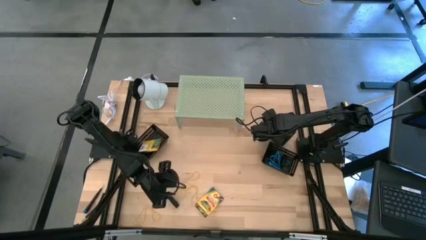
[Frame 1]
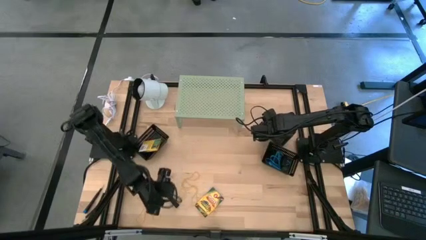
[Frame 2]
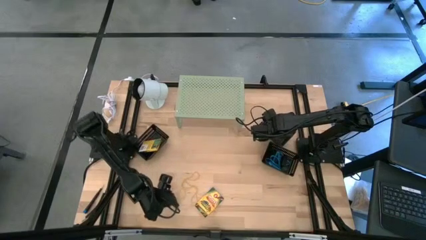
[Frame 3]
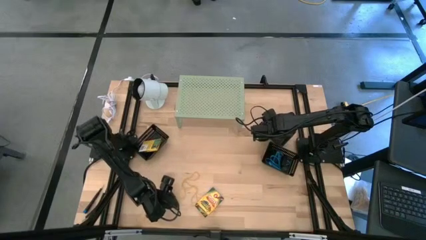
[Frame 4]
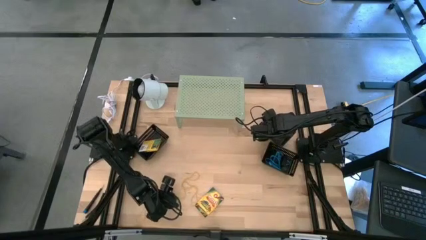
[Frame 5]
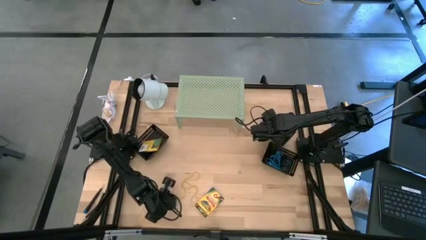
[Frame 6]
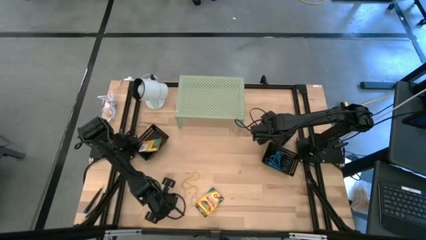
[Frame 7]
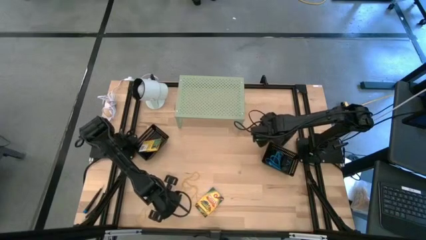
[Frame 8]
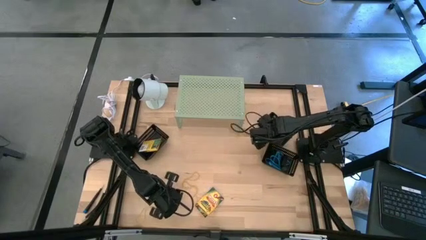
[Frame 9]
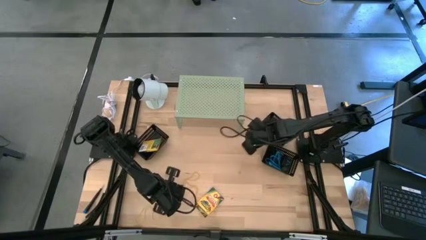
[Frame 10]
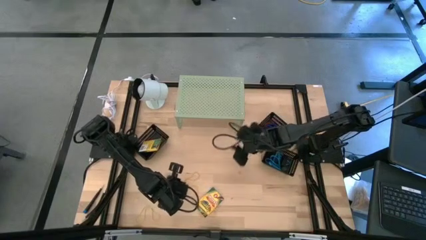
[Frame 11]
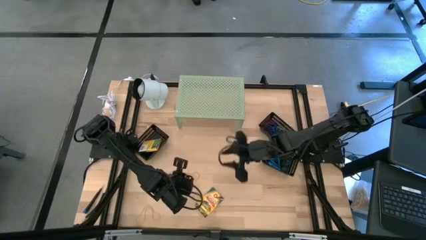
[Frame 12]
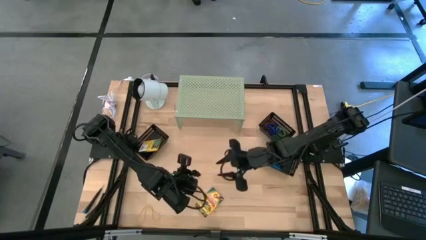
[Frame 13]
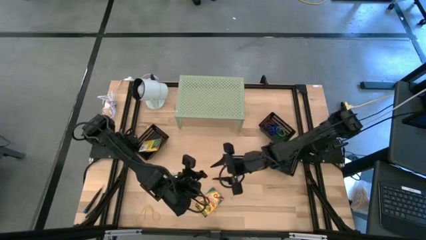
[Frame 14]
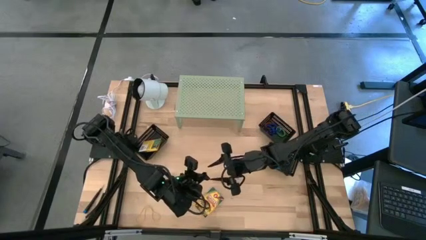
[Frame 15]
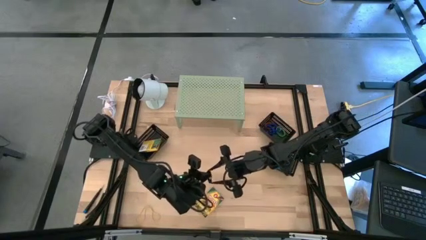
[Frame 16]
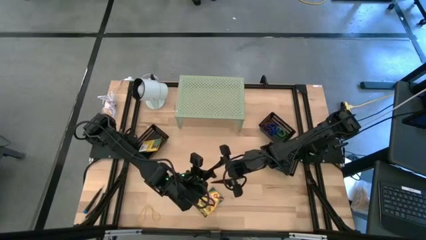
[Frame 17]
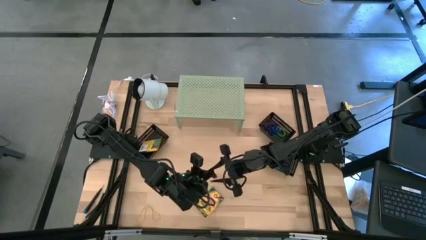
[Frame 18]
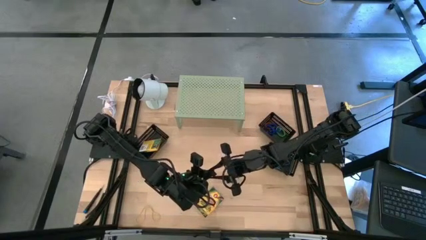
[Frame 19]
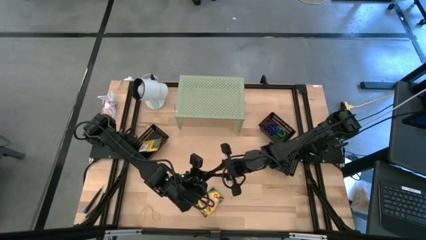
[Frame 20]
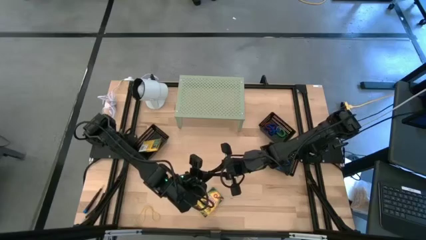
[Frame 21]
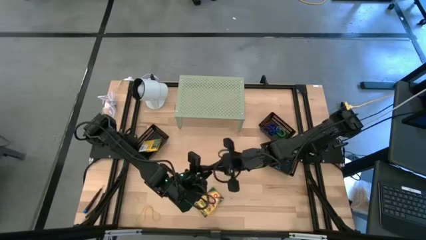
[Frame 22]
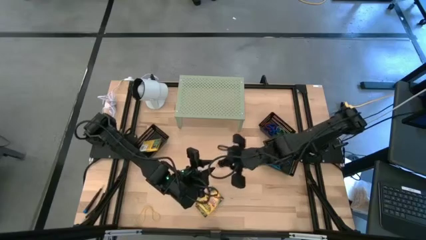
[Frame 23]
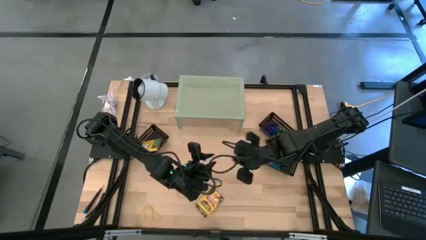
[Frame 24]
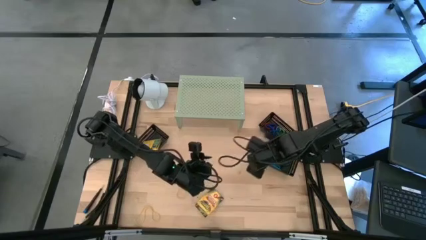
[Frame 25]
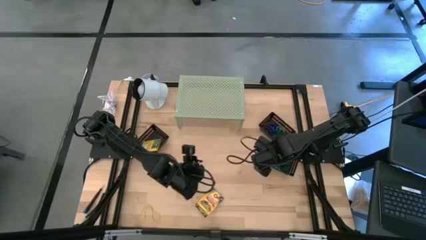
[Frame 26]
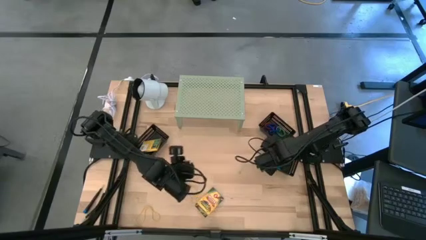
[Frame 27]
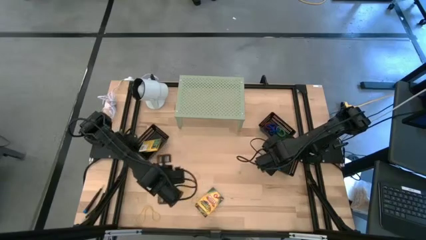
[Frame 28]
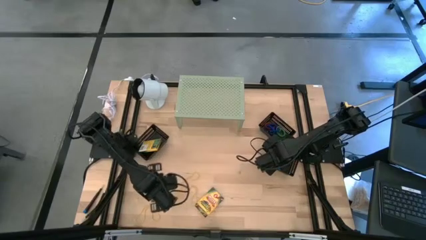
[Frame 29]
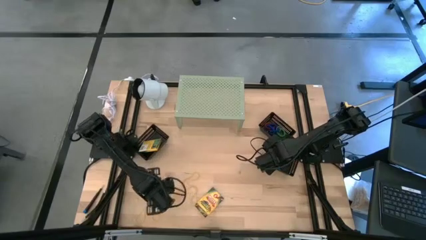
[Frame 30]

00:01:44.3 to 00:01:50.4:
Task: Pick & Place Office Desk Supplies
Put the black rubber band into the bottom right black bin

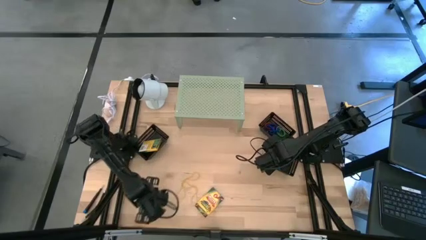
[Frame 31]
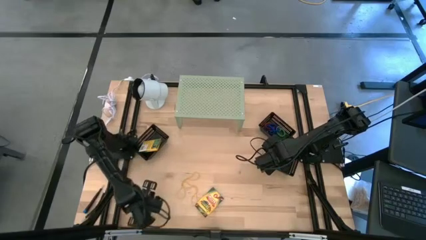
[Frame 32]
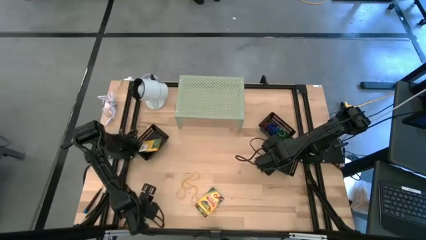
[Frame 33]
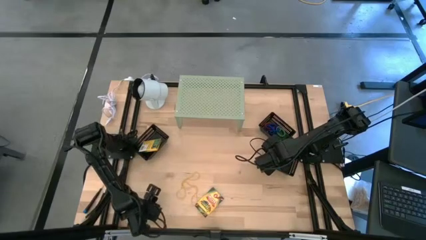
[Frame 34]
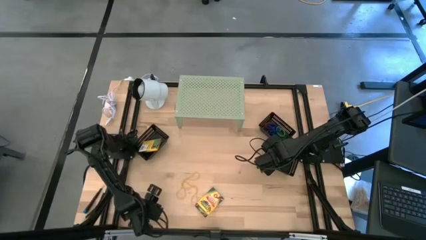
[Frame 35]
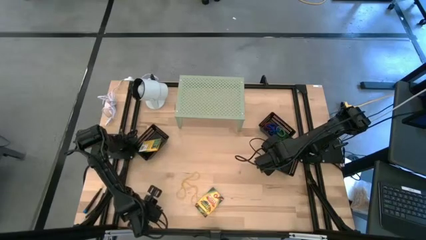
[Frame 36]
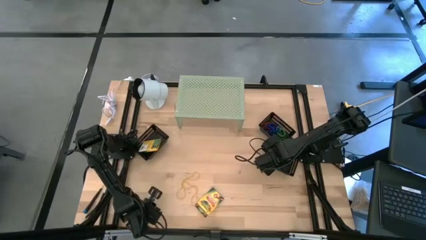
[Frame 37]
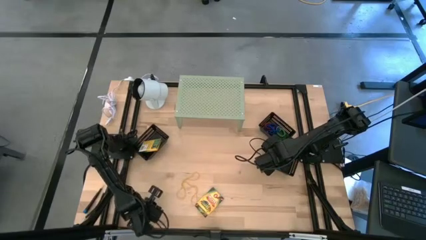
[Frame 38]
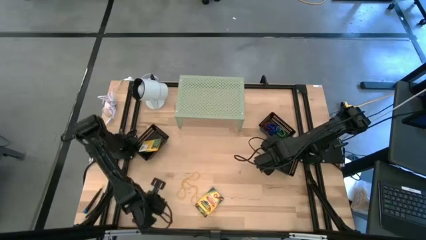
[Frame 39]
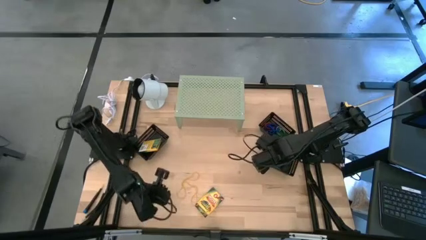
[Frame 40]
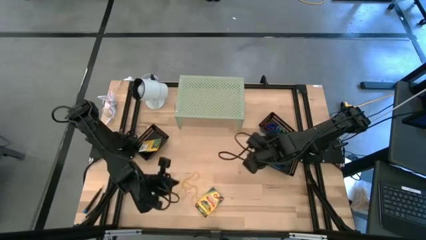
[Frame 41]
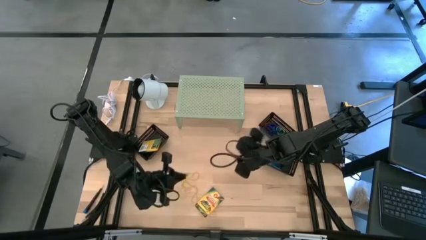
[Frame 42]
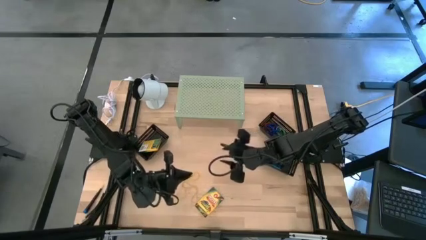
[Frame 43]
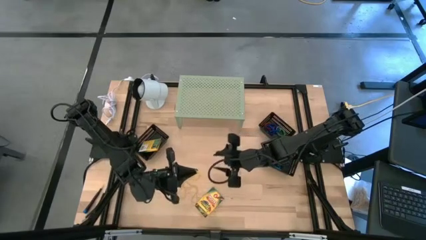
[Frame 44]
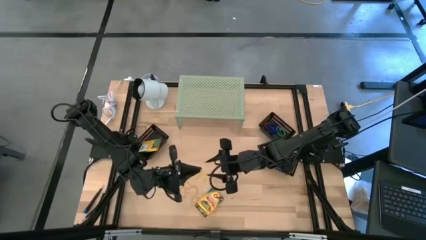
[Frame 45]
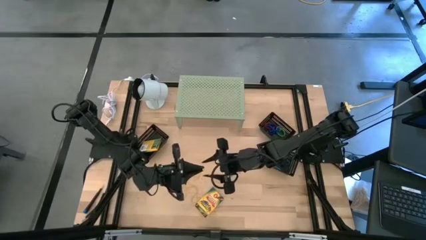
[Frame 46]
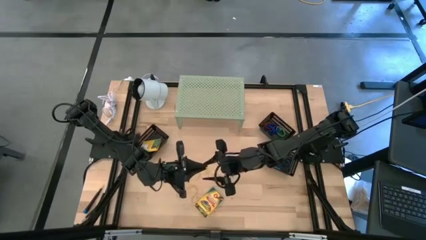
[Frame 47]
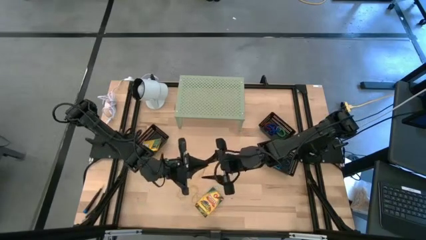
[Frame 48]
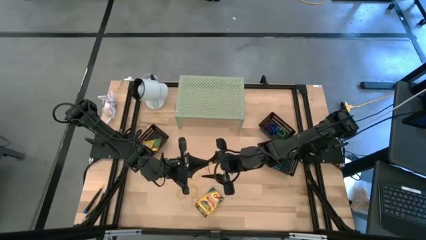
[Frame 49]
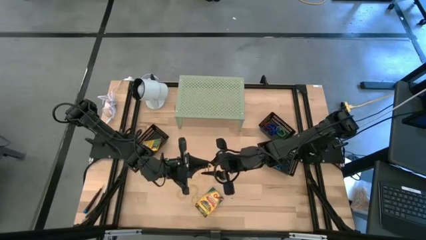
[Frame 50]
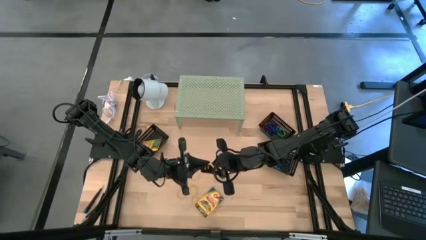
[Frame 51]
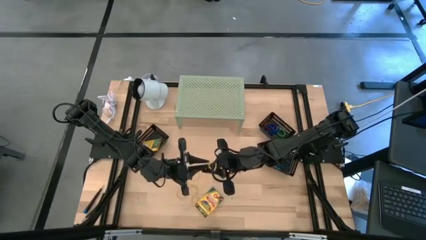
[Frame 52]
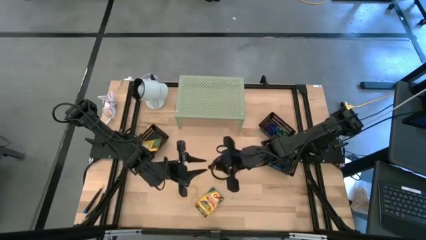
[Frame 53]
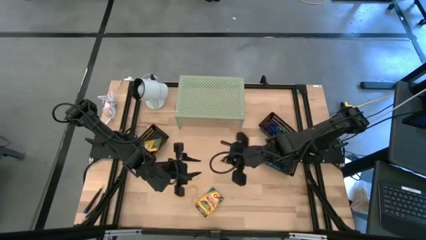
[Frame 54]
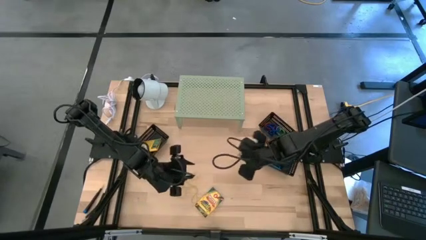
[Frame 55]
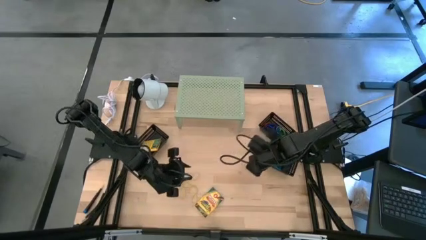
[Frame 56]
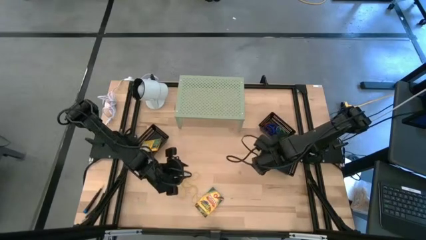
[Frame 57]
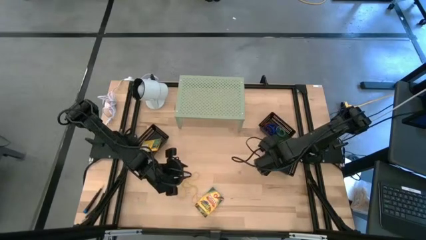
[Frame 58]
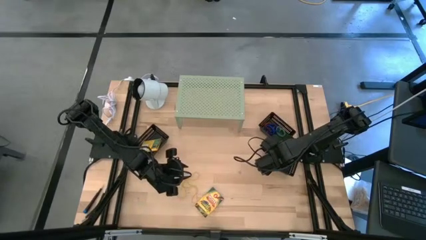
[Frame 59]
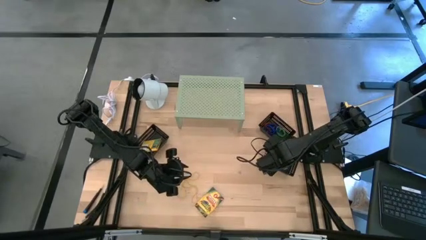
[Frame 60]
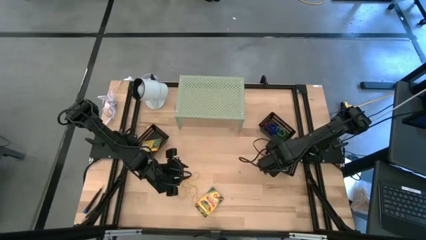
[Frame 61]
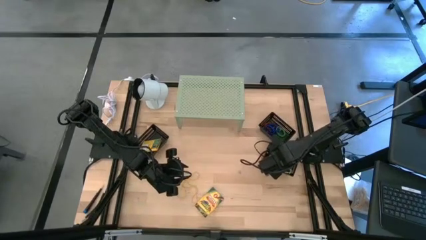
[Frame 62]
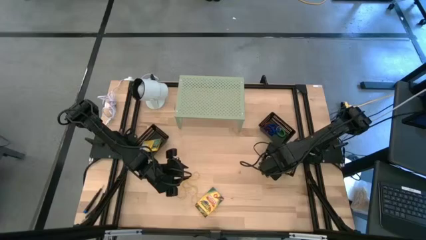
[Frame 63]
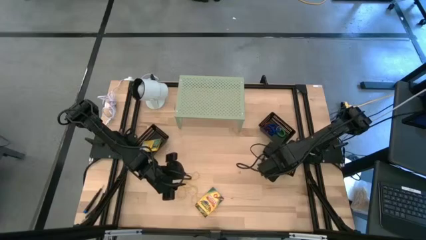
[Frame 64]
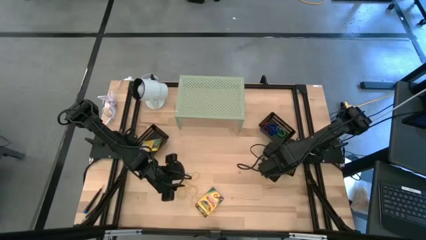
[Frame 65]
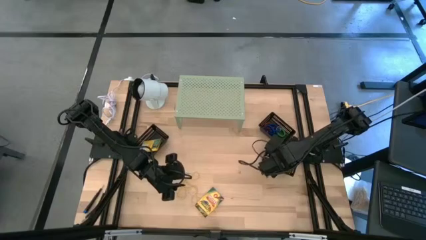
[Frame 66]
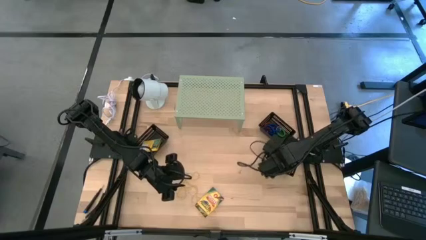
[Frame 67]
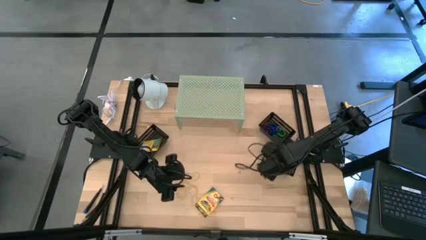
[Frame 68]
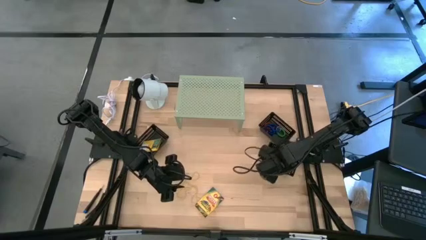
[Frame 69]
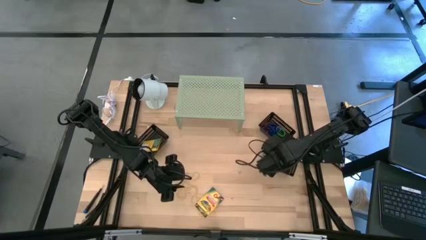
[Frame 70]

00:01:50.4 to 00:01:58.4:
Put the yellow rubber band into the bottom right black bin

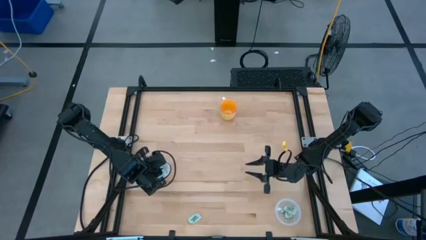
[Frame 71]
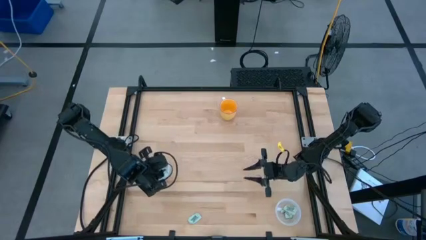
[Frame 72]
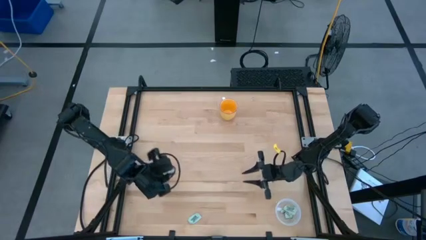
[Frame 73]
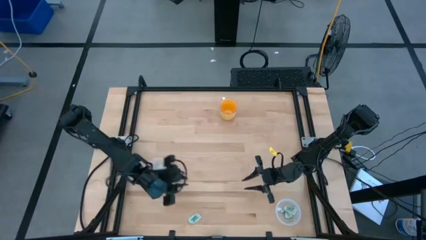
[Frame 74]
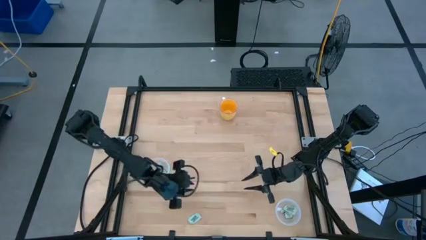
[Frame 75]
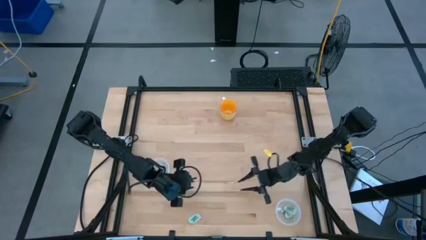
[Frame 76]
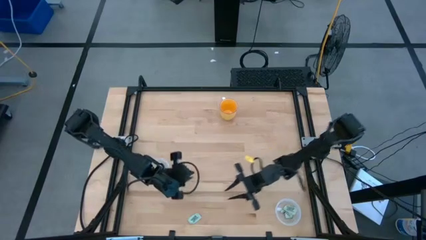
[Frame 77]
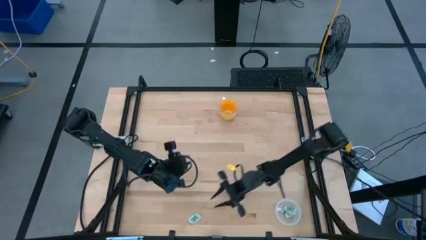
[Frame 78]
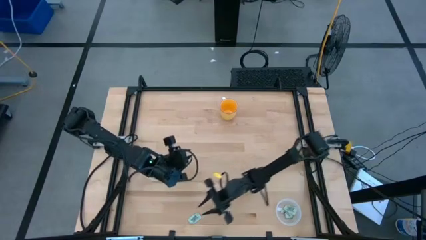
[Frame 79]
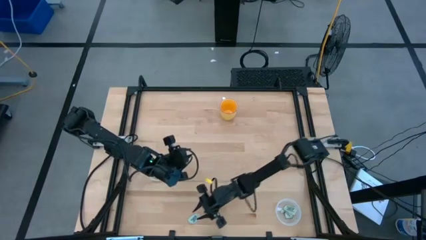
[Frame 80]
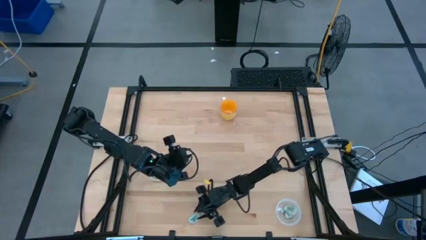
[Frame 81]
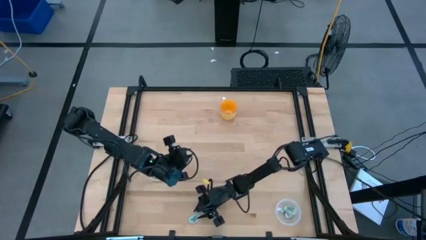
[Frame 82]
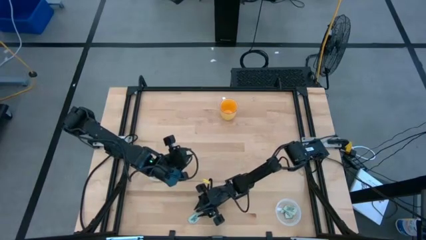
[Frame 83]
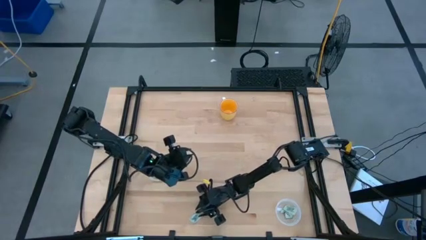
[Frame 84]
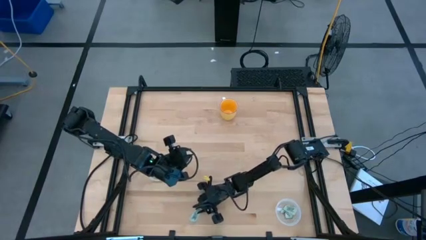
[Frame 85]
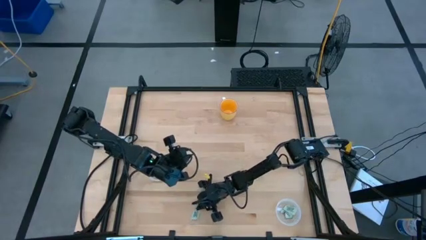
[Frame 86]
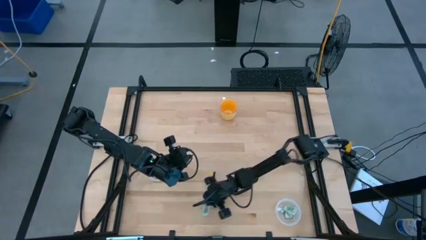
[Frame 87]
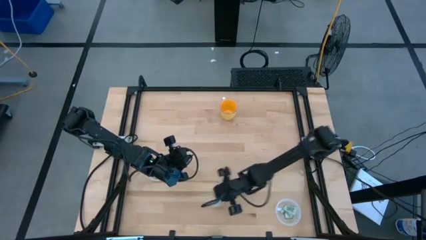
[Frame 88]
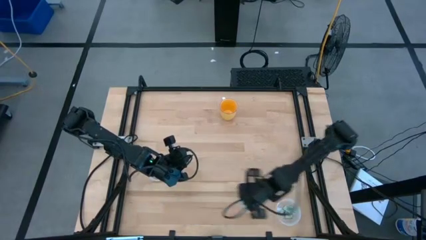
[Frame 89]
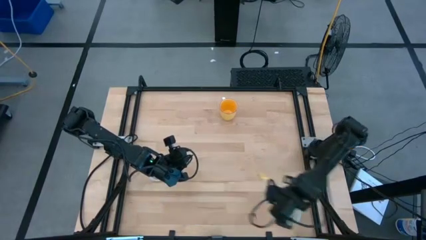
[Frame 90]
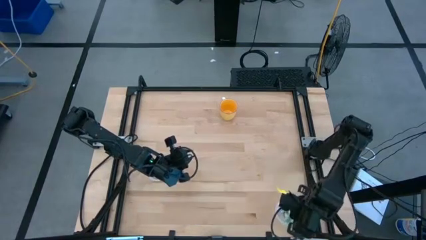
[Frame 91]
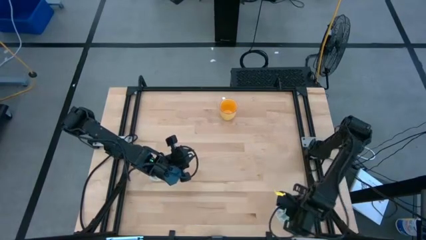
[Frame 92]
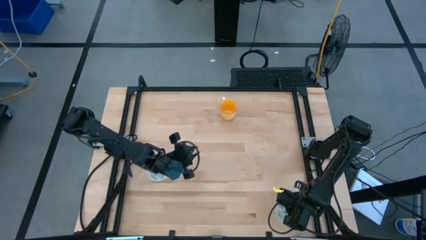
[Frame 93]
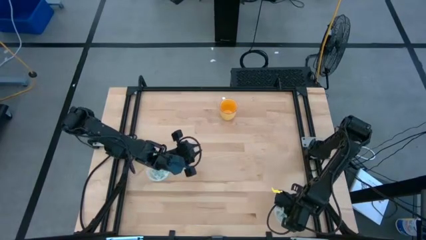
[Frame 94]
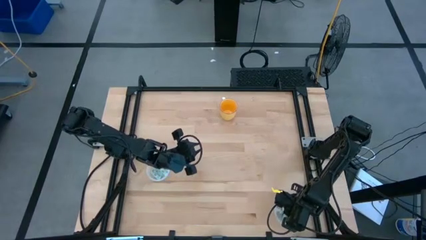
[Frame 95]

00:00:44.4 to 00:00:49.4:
Task: Pick and place Stevia / Truvia into bins
Put the light green stevia packet into the right transparent container
